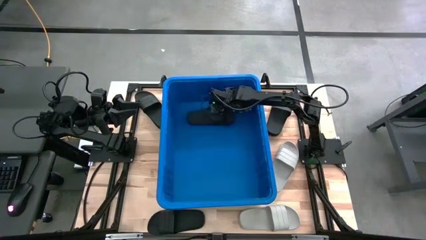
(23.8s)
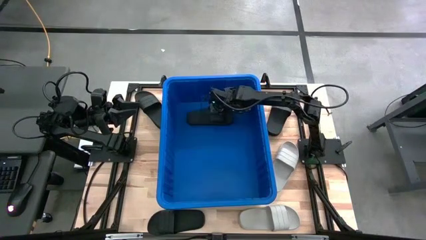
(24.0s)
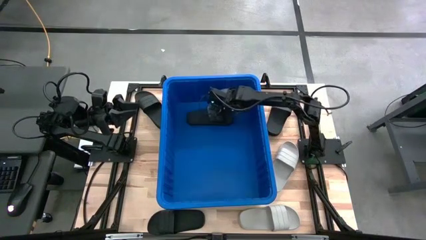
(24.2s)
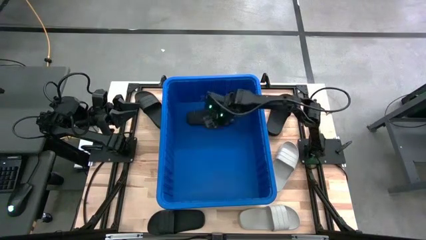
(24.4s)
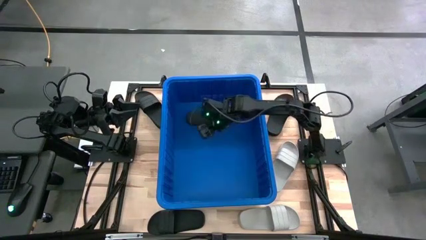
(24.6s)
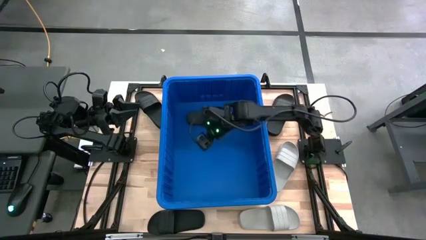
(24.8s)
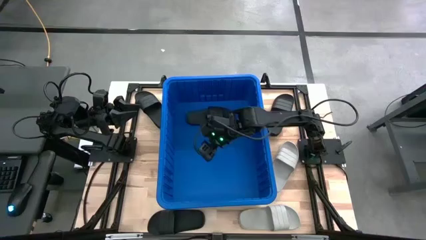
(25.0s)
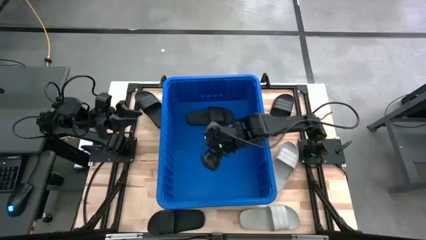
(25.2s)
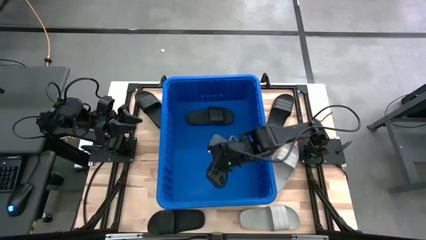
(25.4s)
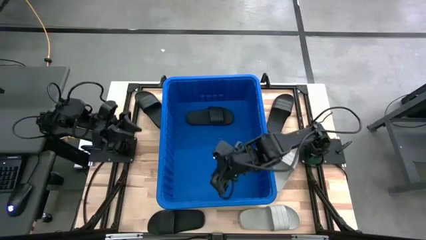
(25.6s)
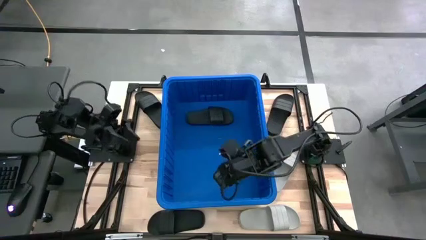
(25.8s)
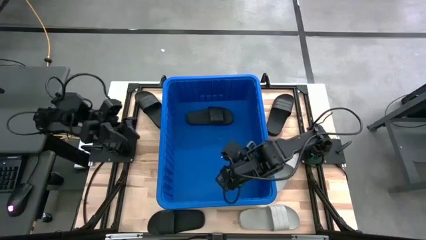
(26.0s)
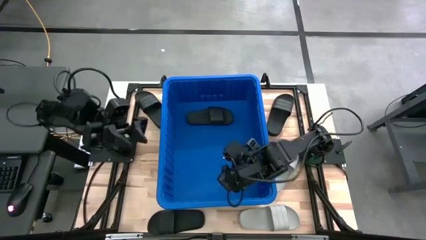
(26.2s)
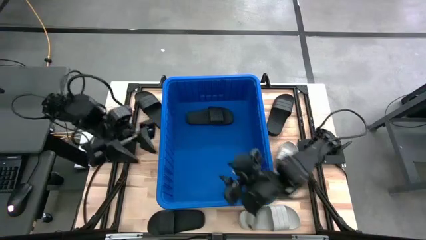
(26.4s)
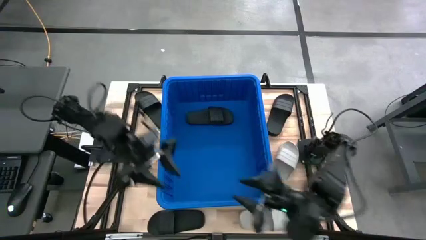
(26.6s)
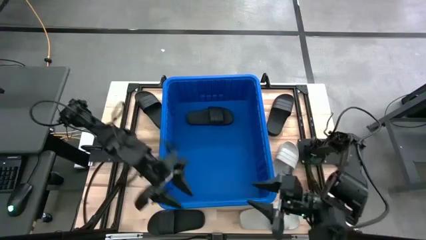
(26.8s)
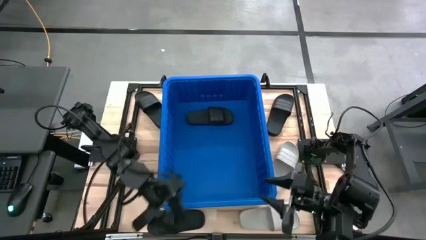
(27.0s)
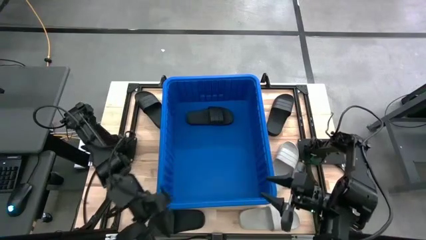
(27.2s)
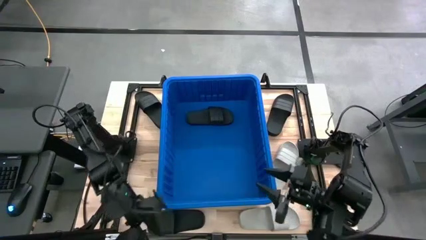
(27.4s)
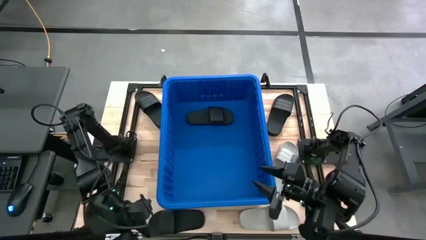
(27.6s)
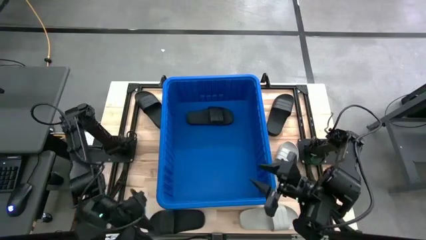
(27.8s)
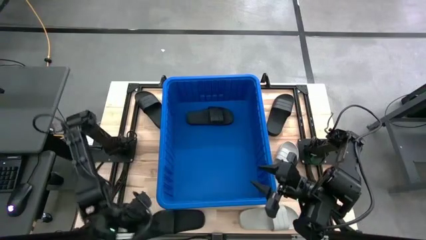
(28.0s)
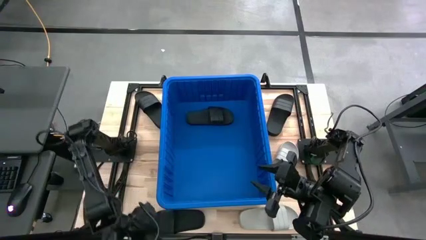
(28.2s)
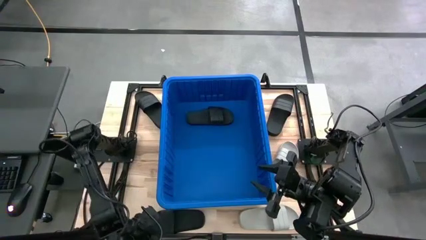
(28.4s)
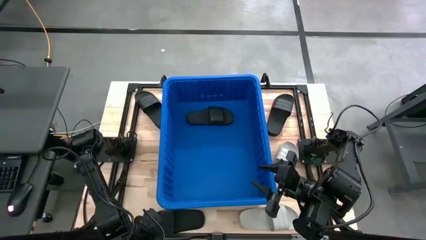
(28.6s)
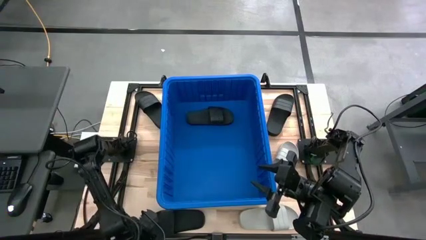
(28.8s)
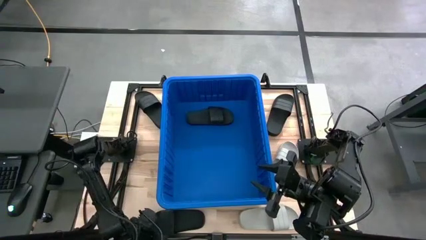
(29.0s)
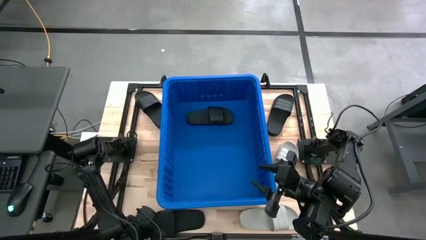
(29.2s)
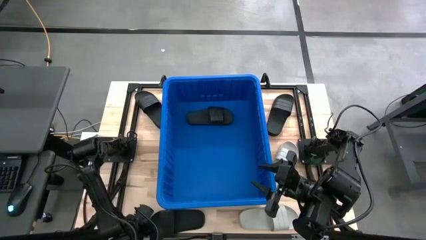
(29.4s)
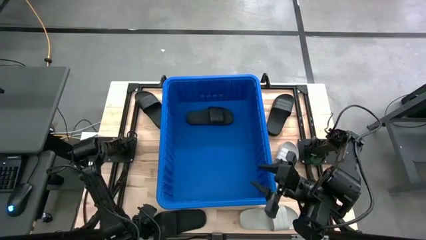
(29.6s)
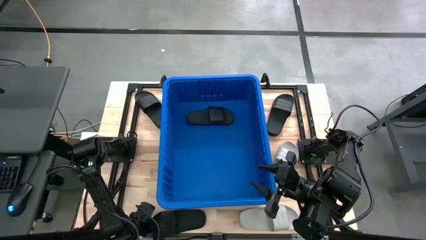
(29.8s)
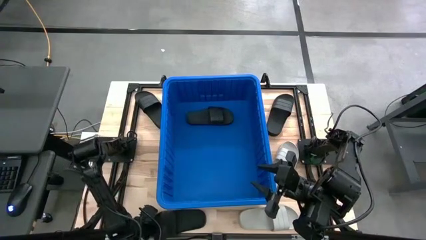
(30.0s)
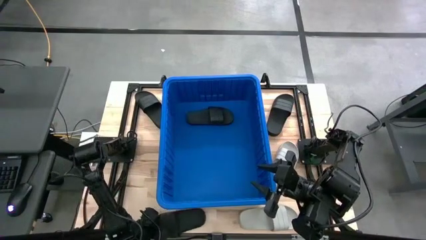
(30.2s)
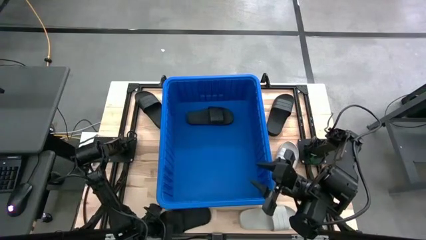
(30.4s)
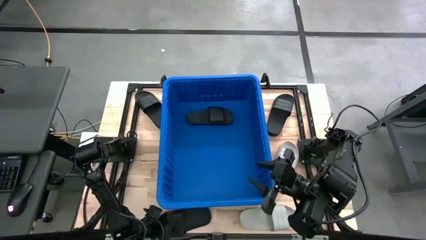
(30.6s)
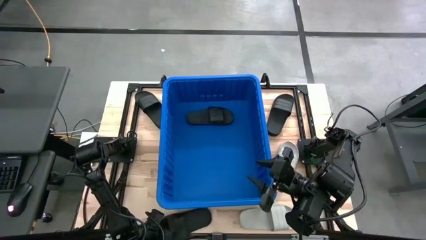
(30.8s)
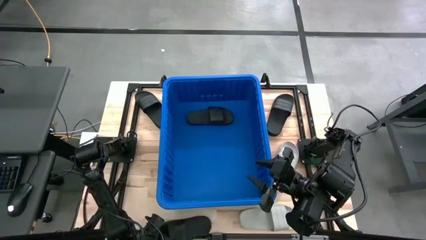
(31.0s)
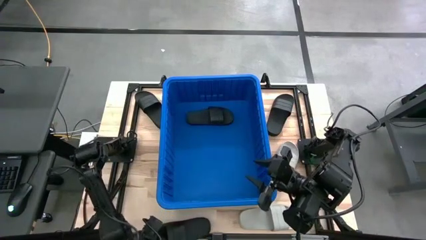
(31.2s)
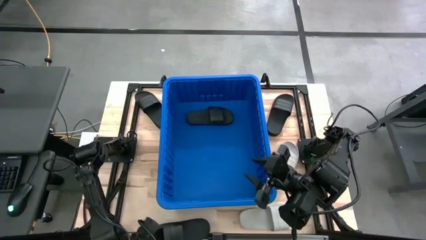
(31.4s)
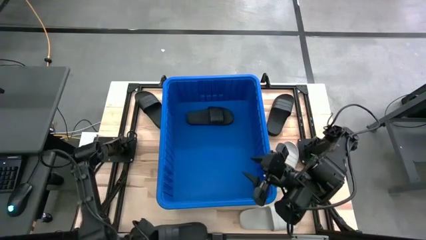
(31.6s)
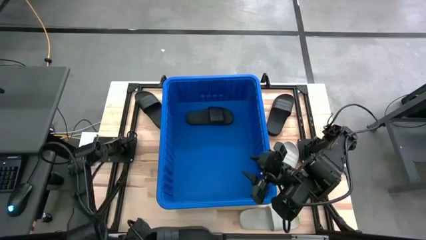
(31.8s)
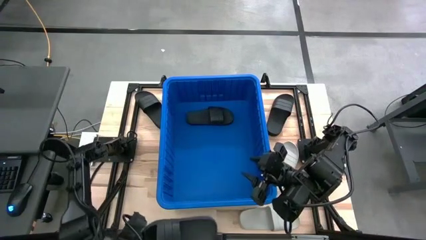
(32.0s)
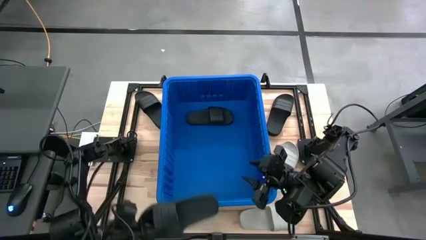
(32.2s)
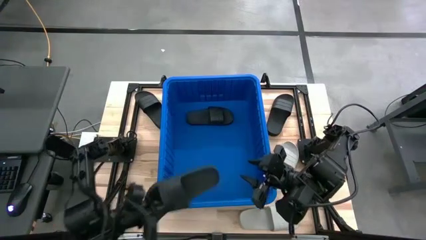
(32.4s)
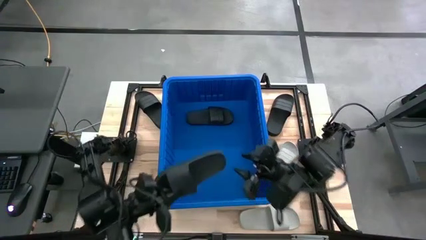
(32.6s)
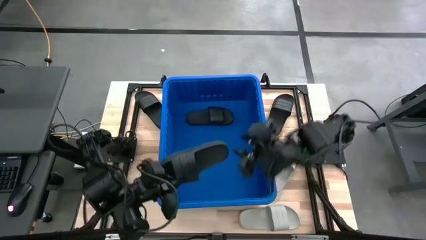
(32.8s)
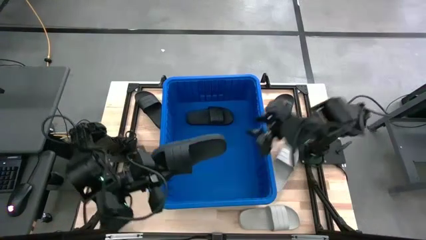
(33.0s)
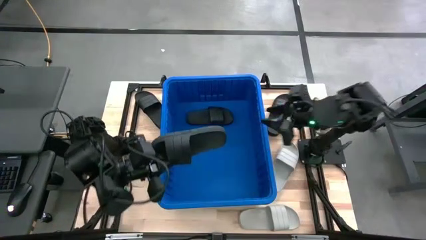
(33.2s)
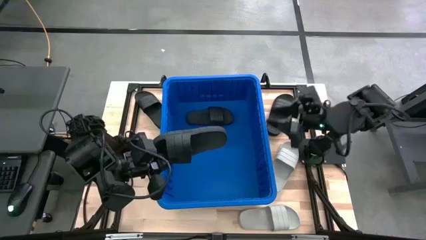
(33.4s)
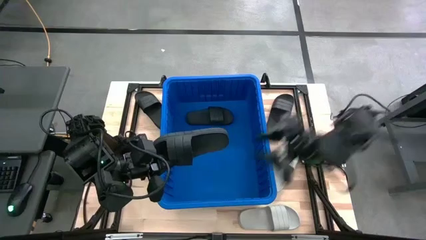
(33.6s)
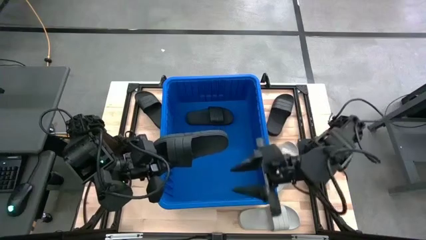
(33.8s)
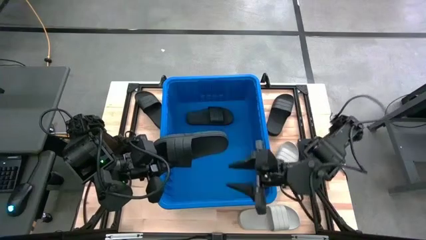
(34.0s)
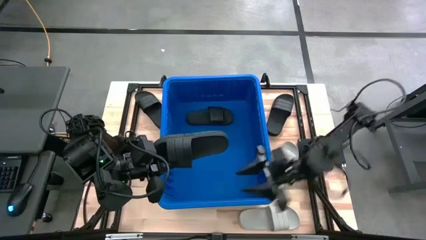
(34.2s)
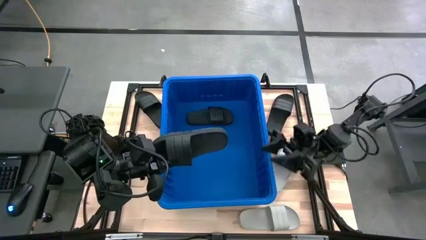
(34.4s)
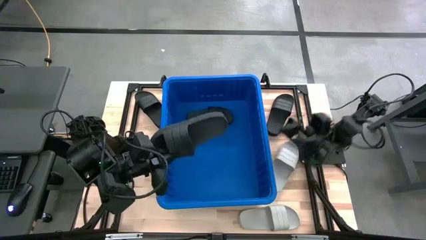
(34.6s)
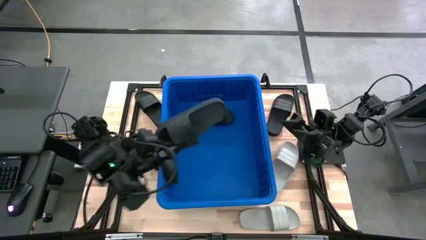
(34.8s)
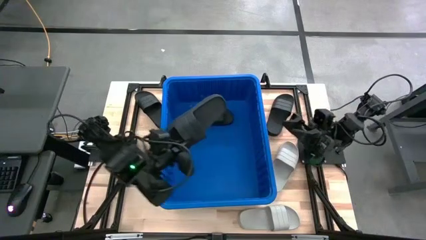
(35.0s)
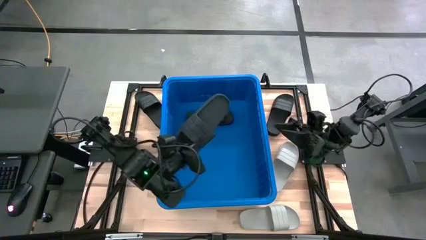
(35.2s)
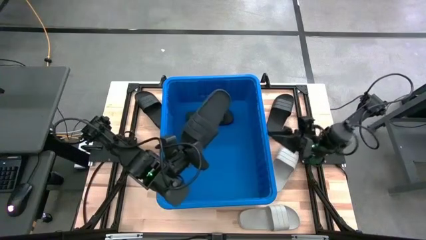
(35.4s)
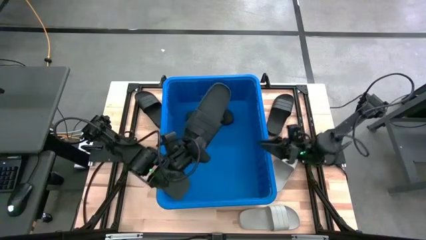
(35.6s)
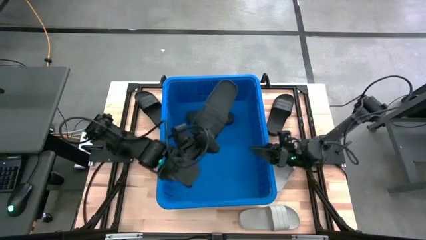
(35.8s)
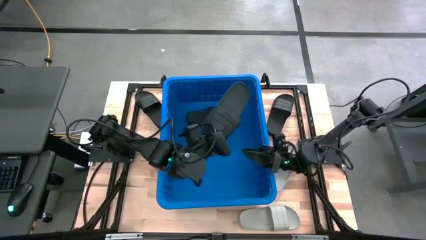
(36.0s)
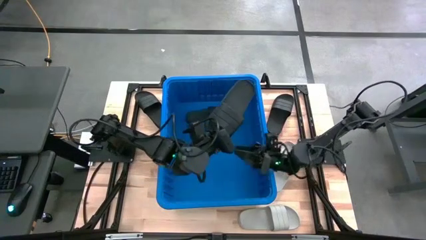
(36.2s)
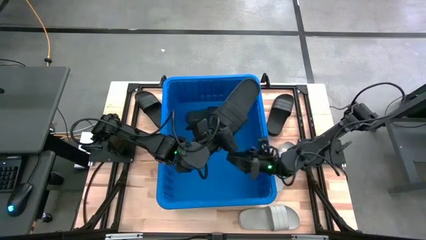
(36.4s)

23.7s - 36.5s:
Task: Pick and place slides into bin
Put the black slide into the blue bin
